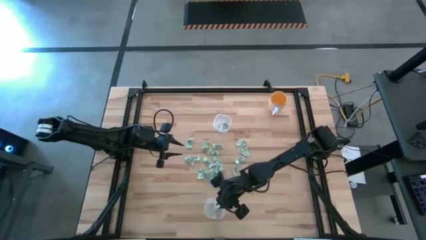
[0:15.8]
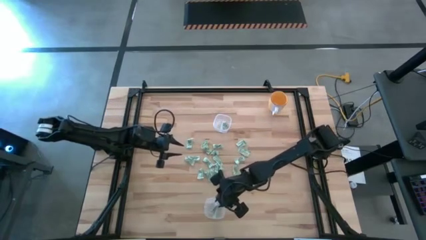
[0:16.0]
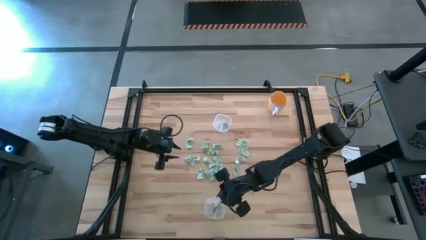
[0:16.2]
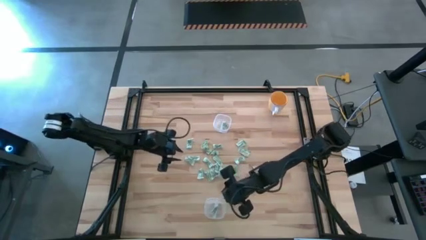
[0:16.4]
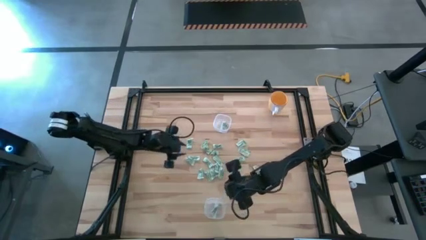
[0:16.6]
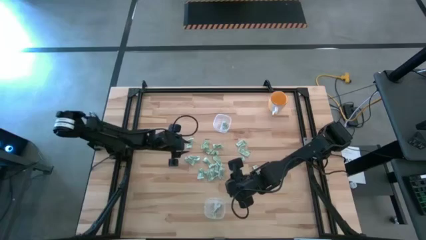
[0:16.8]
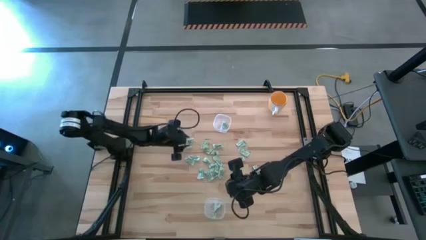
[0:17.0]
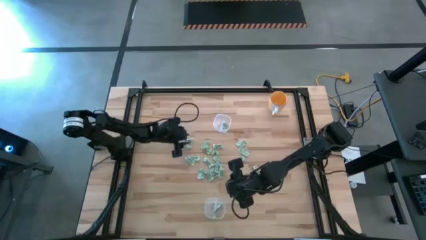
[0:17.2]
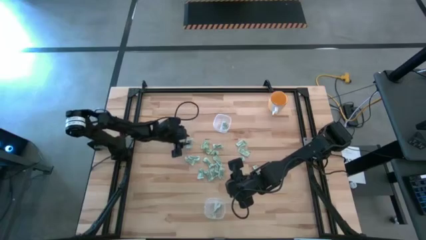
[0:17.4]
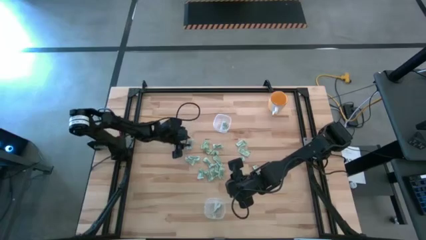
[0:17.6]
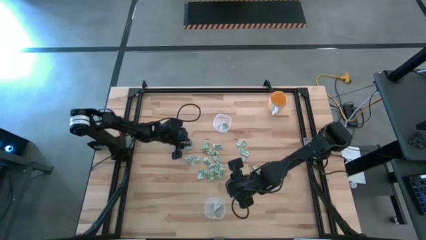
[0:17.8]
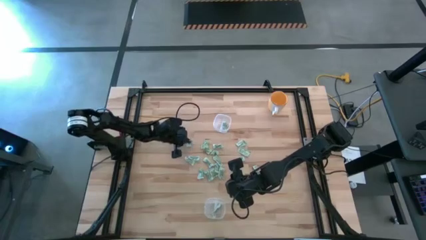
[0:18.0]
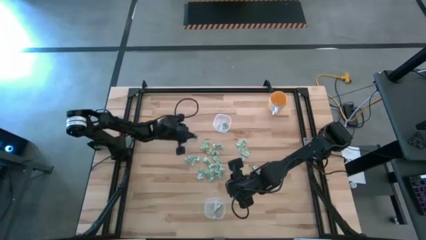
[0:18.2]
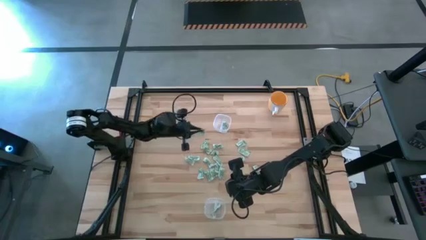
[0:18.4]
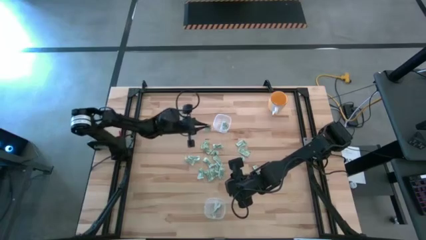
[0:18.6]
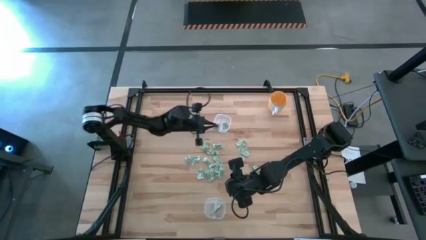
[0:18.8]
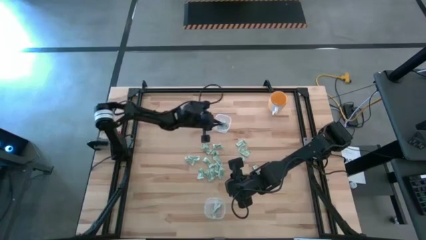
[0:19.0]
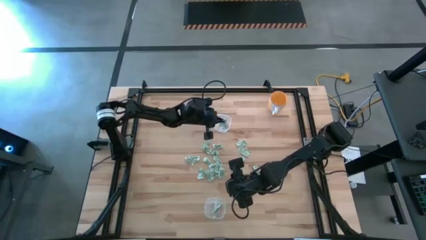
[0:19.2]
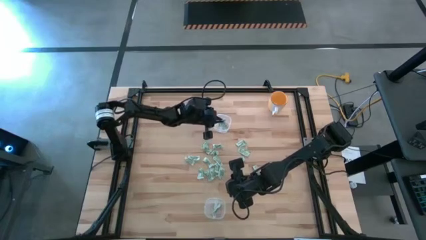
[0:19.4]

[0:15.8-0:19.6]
Task: Pick and place items into bin
Put the stevia packet into the top transparent bin

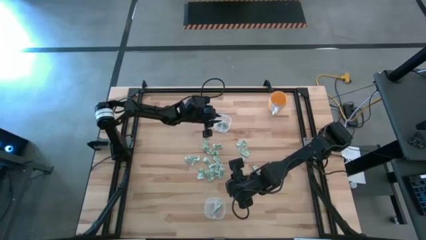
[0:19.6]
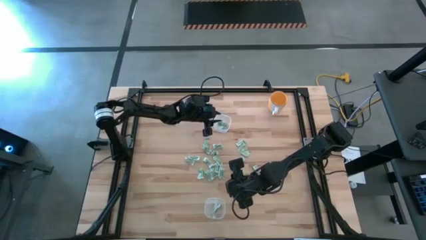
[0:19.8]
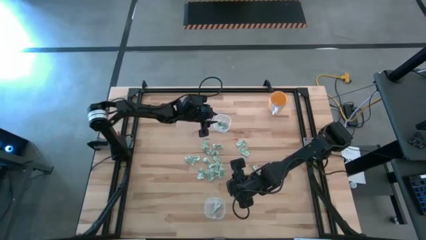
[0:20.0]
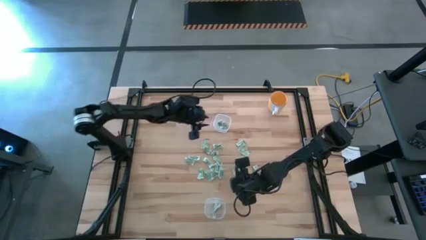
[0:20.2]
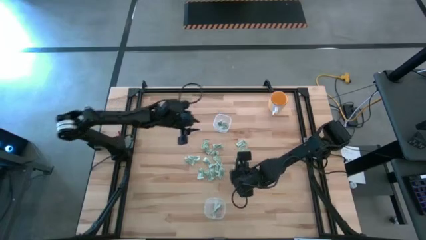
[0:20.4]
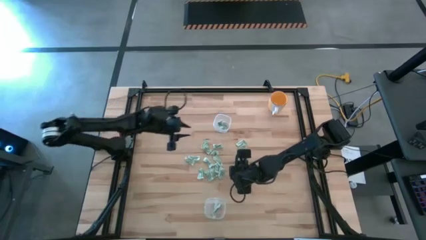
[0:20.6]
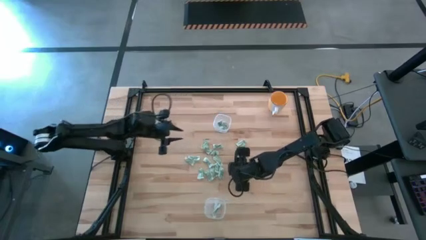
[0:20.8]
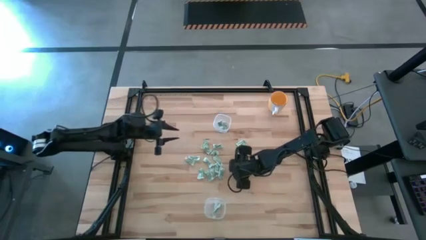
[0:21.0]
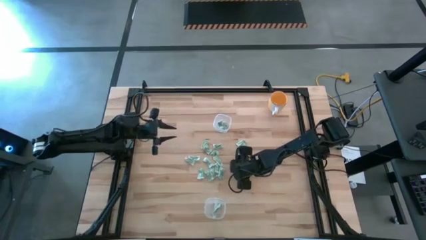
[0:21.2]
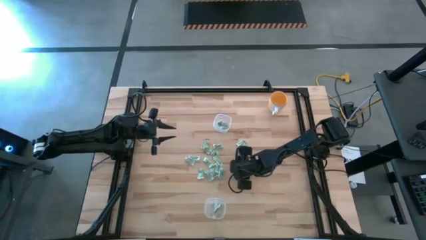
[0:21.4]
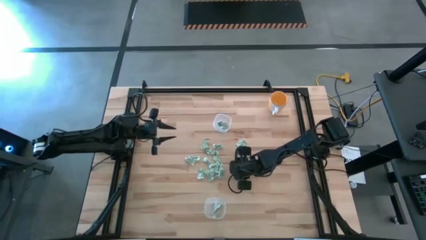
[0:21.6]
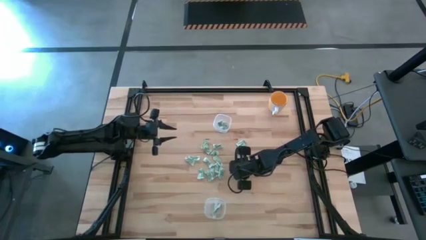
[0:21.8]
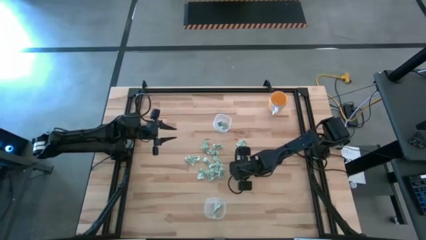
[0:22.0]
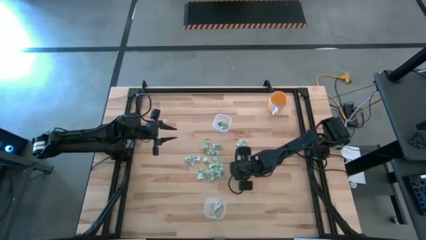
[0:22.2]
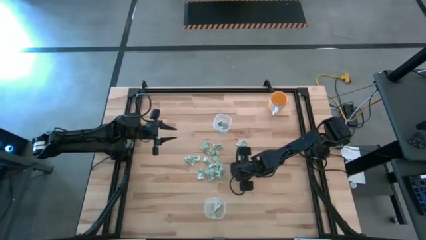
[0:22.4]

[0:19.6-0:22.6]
Put the stevia packet into the bottom transparent bin

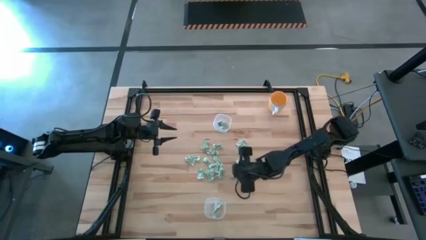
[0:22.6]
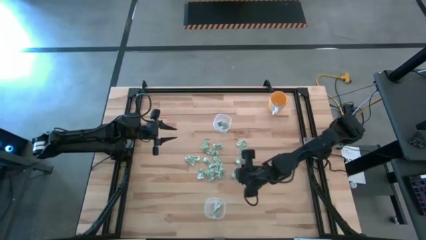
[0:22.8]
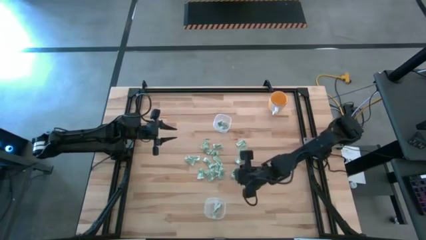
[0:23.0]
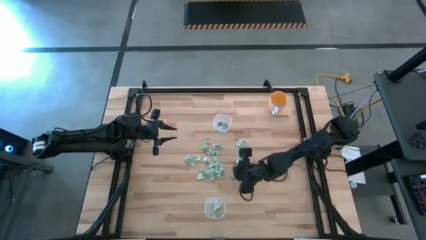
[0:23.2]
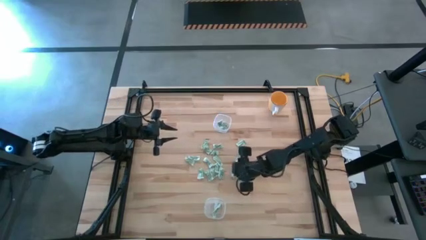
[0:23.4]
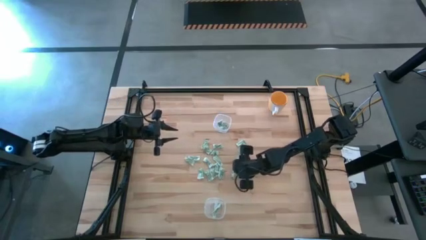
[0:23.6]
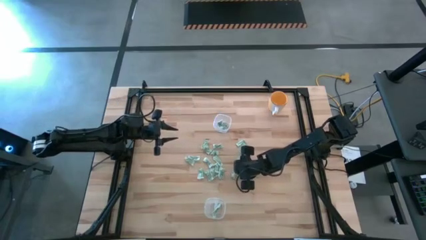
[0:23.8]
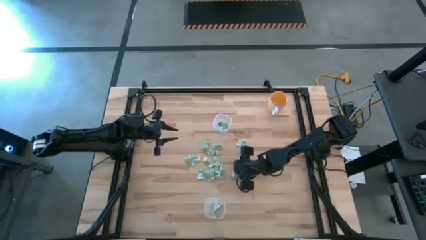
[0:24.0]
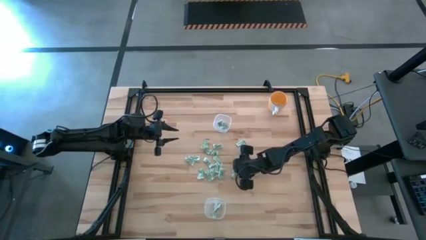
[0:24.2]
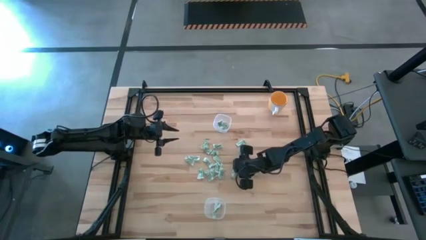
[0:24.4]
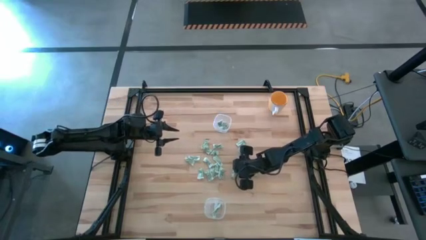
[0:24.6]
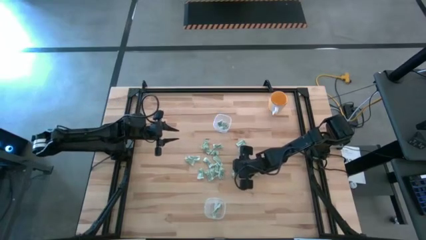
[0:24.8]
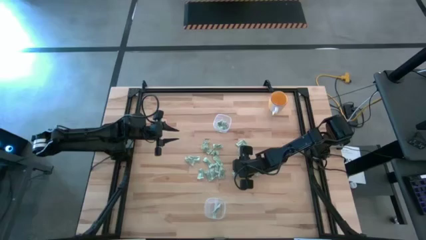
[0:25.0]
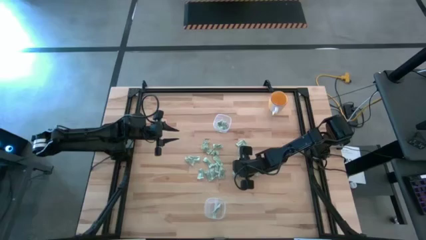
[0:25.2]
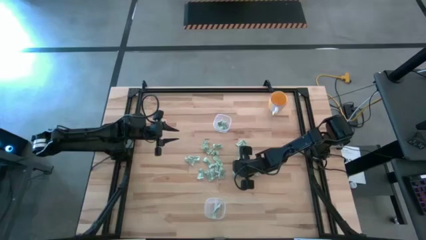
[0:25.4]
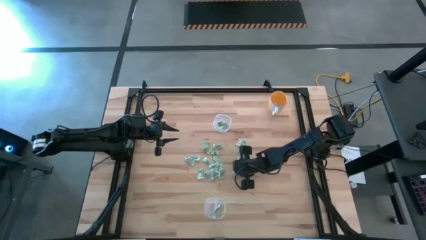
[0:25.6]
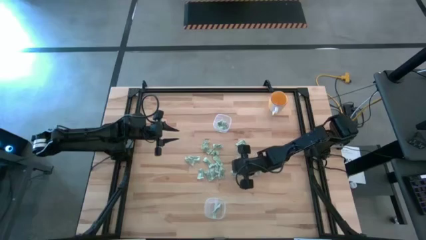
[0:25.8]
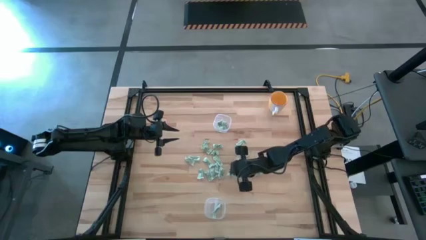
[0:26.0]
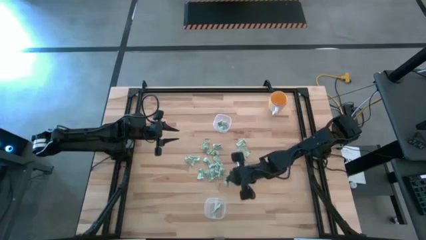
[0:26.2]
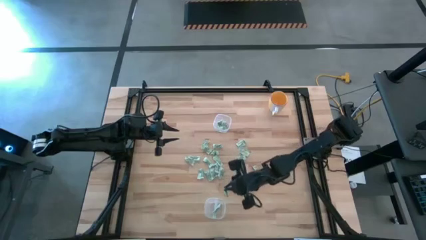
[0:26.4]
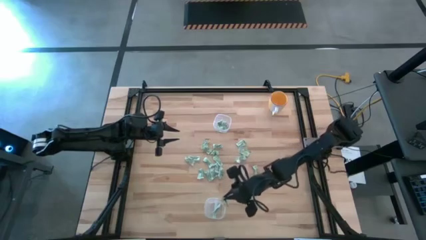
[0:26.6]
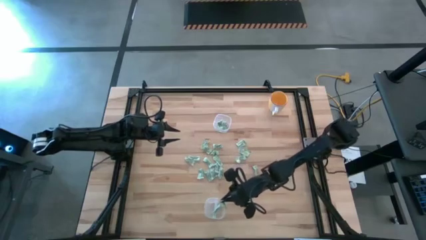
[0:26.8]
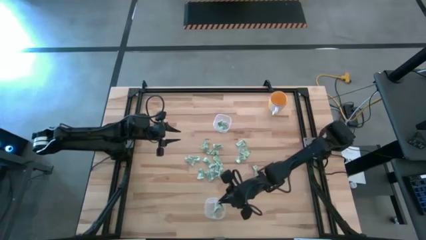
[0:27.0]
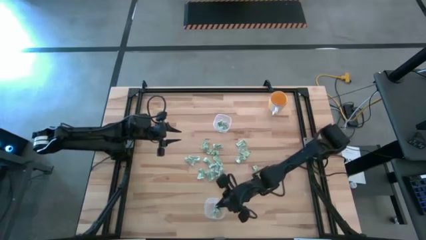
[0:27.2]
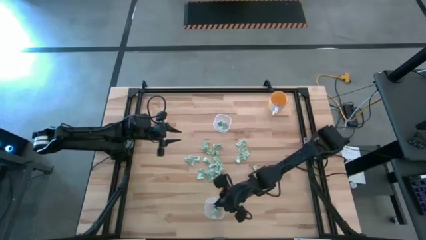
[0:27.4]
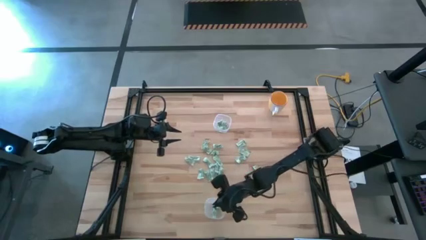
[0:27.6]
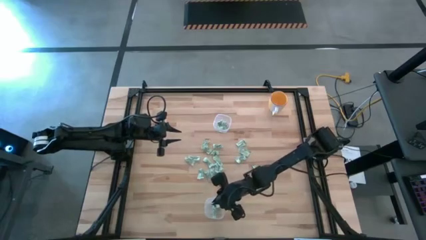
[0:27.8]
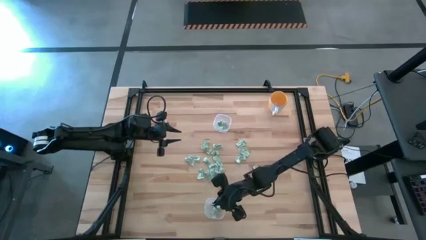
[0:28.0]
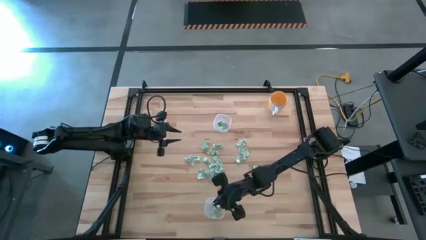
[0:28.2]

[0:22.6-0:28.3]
Put the stevia packet into the bottom transparent bin

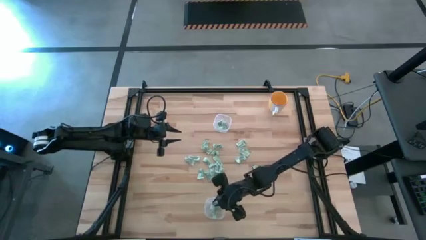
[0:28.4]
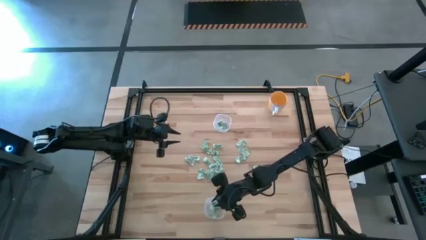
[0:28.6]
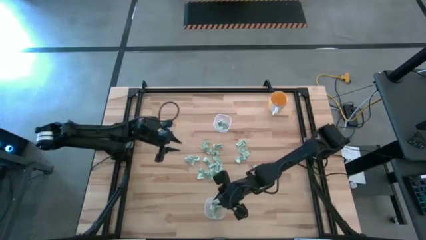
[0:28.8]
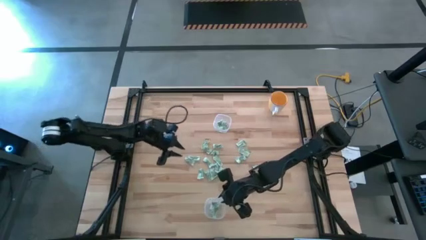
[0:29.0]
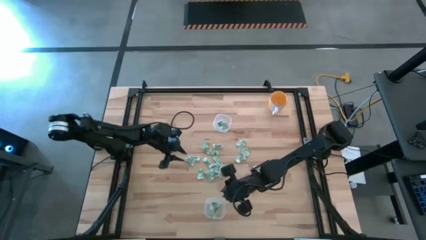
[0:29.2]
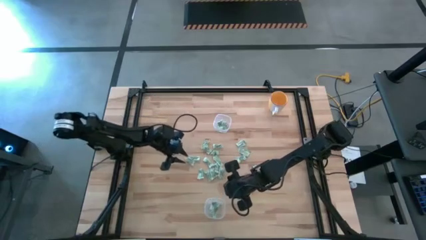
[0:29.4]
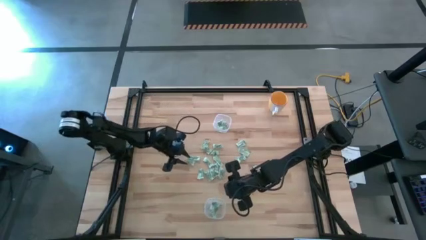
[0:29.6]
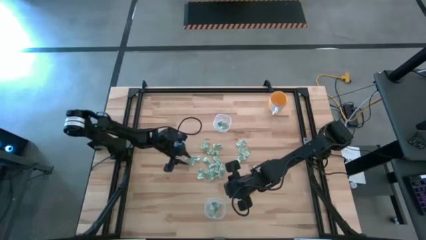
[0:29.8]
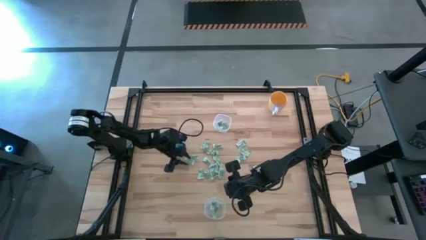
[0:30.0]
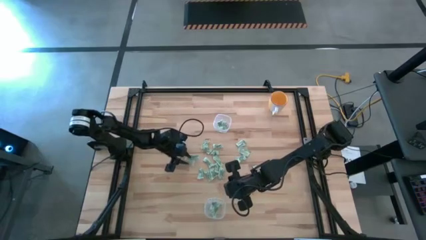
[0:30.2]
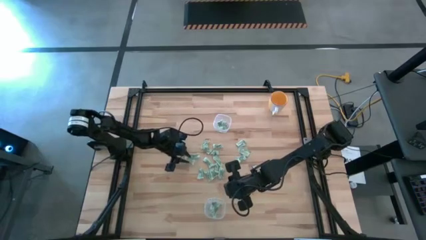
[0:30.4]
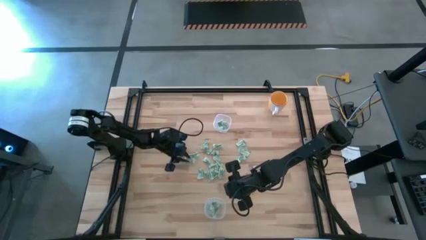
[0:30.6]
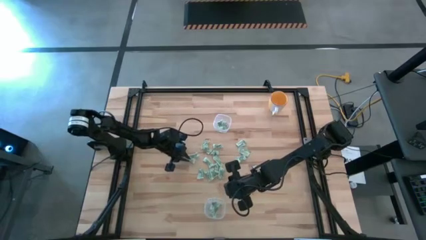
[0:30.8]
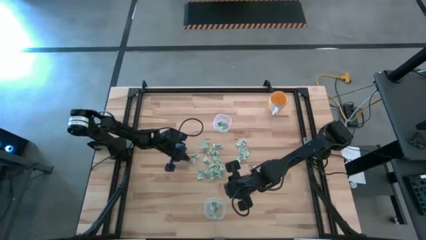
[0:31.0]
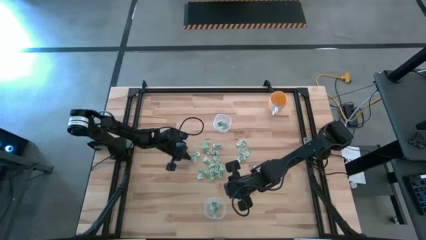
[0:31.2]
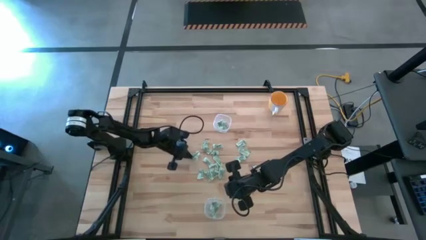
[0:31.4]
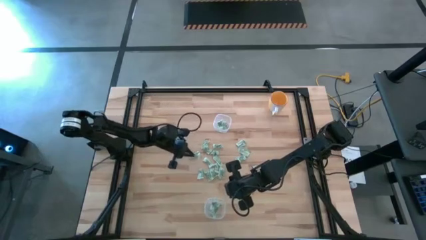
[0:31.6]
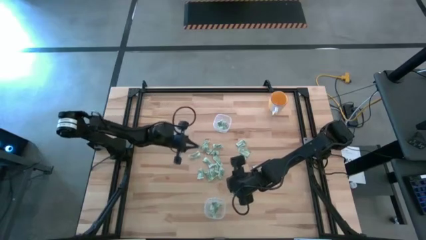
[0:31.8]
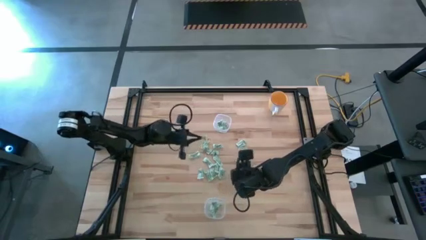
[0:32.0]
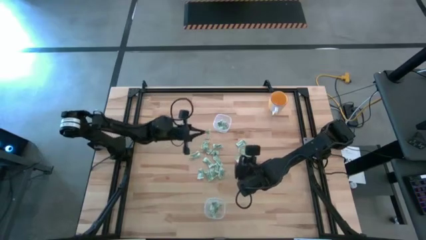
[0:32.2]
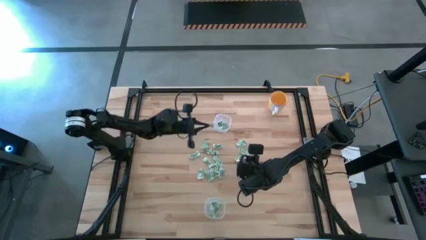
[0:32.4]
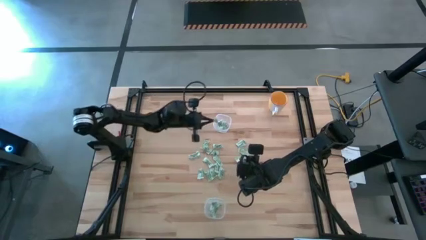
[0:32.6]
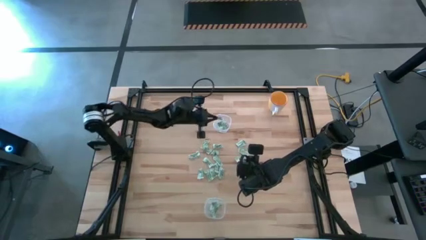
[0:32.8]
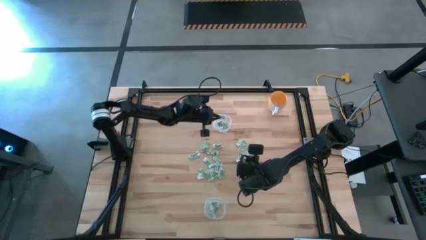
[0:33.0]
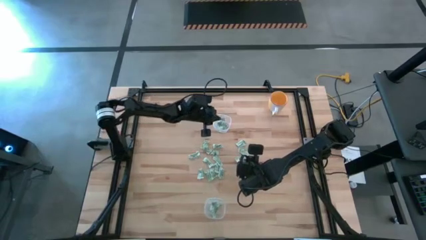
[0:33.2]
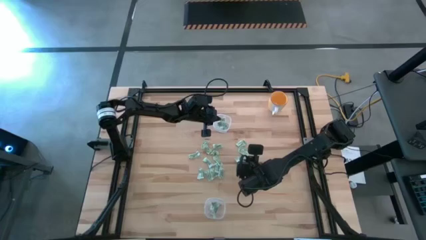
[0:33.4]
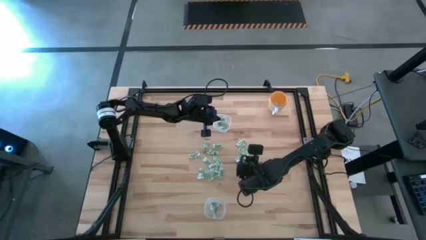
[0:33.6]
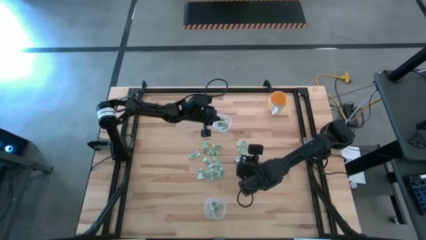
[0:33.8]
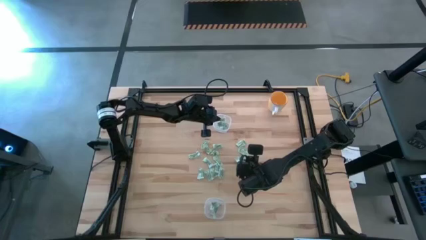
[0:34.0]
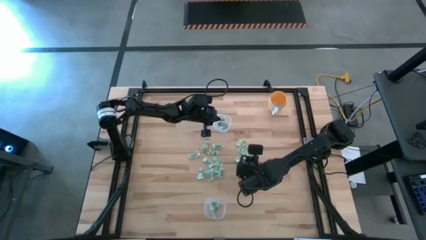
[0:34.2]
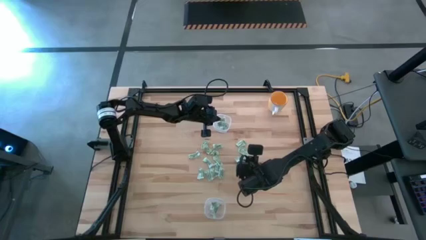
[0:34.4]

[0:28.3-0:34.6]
Put the stevia packet into the top transparent bin
